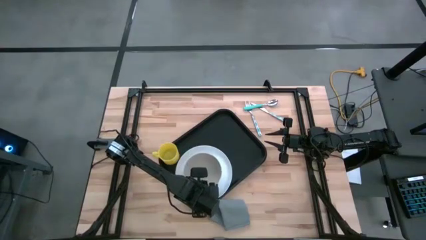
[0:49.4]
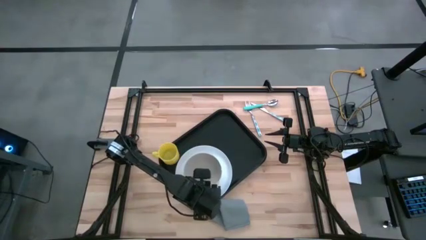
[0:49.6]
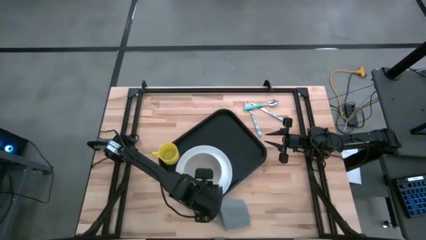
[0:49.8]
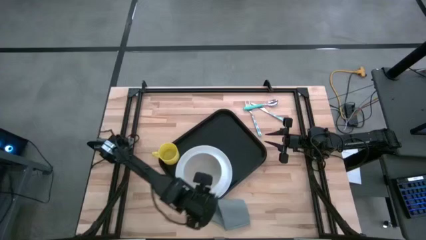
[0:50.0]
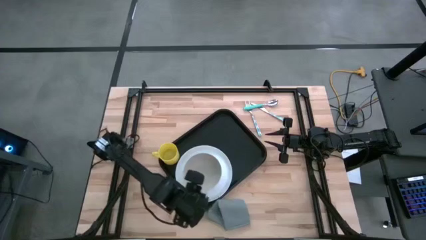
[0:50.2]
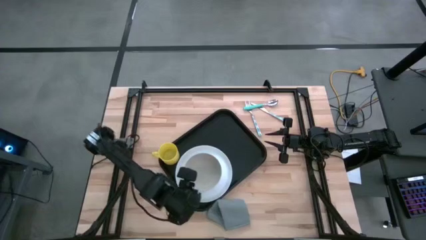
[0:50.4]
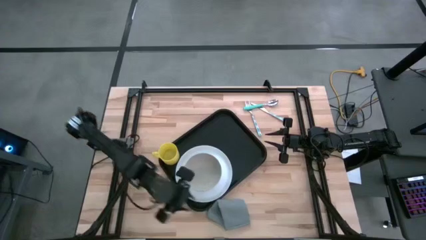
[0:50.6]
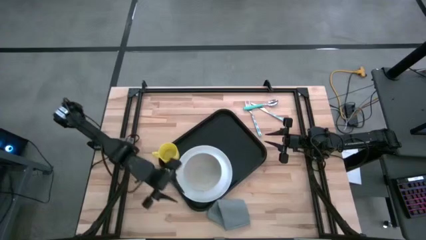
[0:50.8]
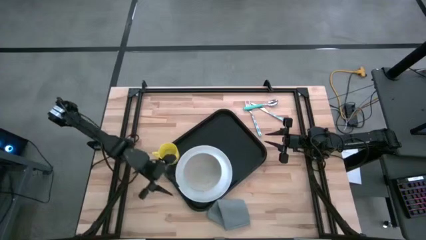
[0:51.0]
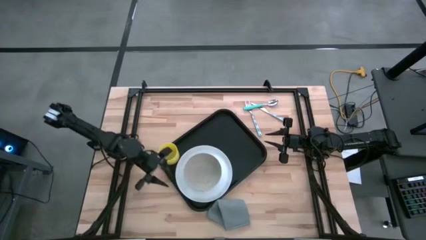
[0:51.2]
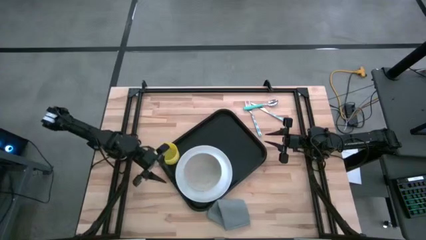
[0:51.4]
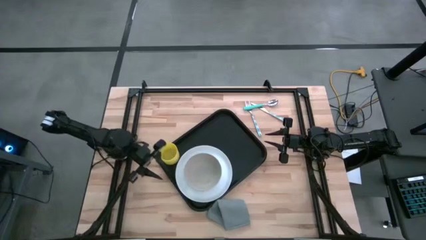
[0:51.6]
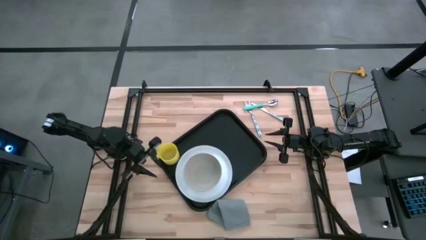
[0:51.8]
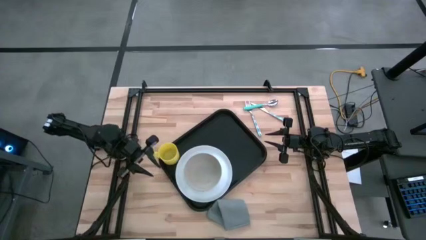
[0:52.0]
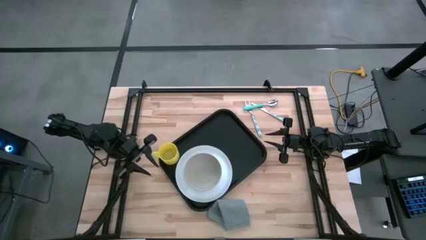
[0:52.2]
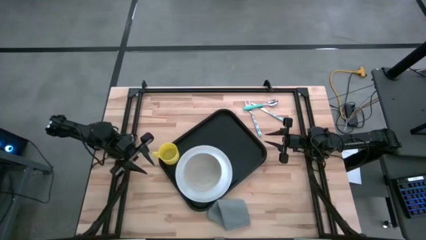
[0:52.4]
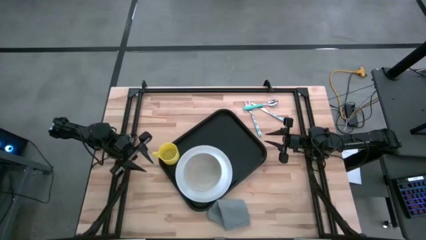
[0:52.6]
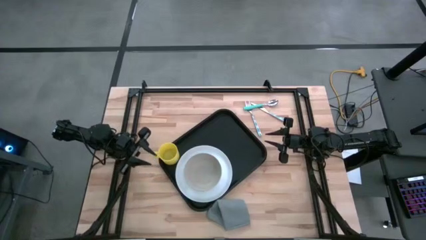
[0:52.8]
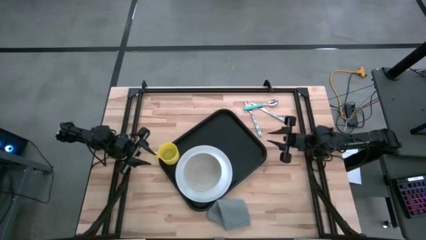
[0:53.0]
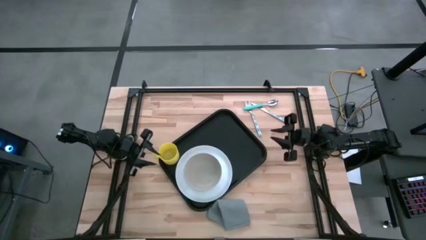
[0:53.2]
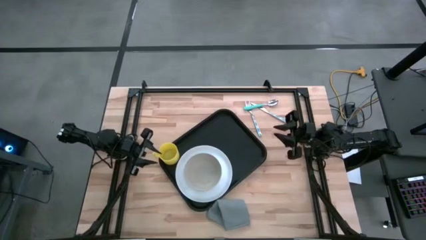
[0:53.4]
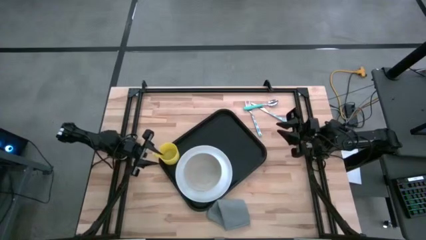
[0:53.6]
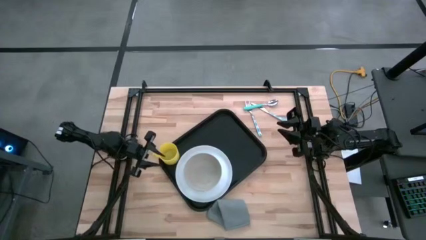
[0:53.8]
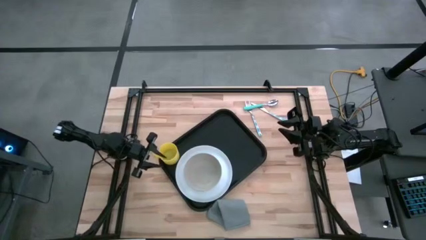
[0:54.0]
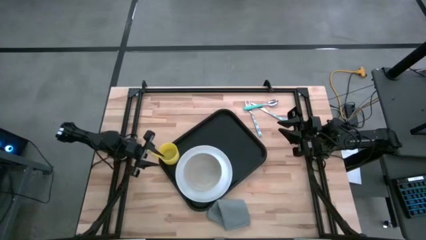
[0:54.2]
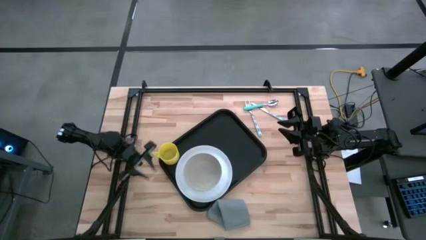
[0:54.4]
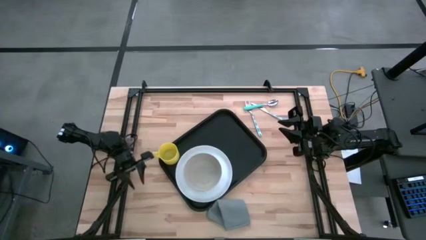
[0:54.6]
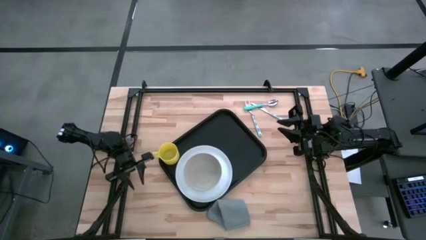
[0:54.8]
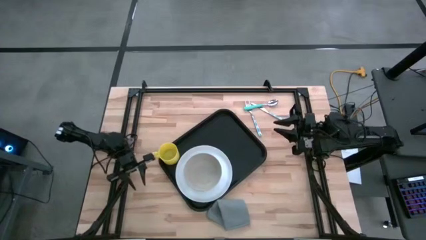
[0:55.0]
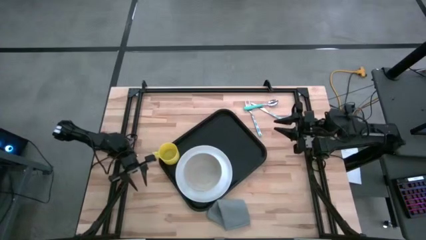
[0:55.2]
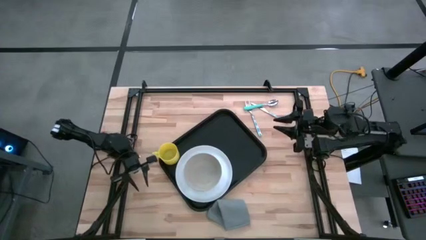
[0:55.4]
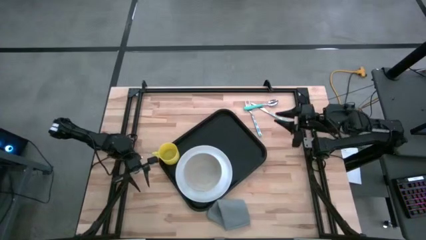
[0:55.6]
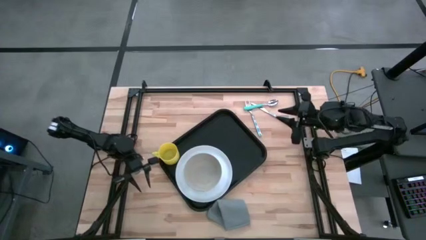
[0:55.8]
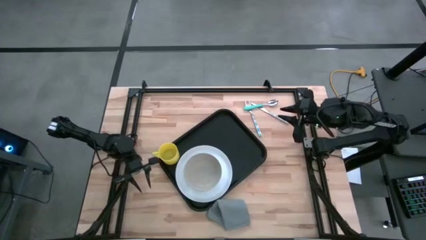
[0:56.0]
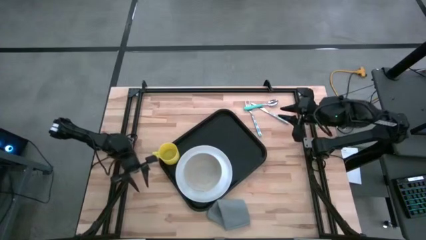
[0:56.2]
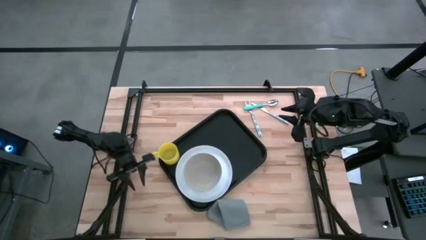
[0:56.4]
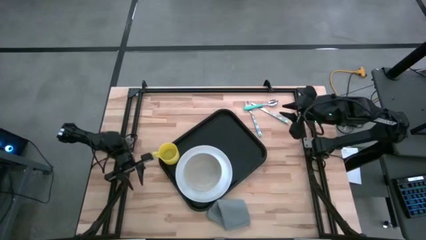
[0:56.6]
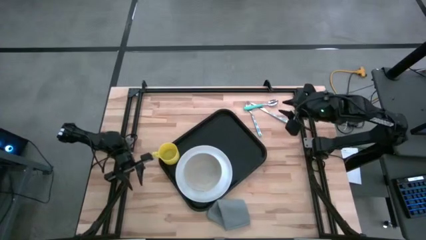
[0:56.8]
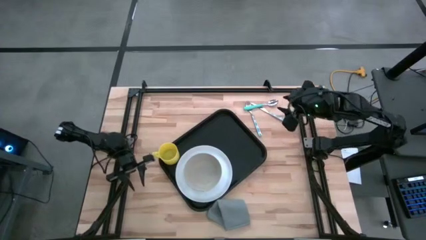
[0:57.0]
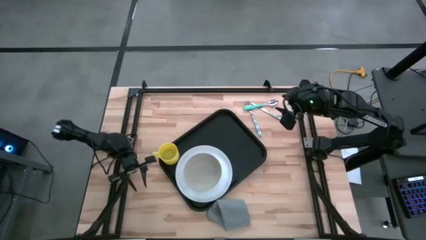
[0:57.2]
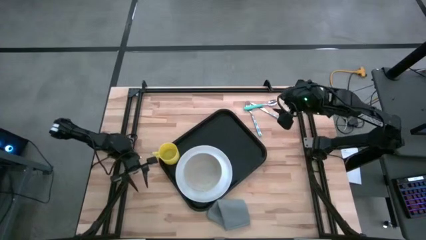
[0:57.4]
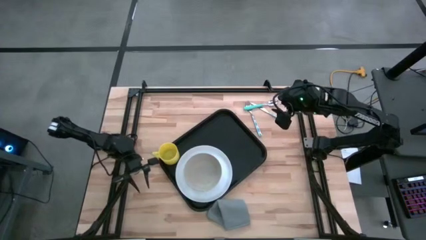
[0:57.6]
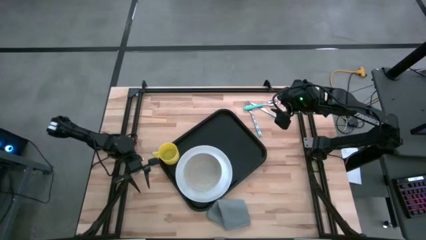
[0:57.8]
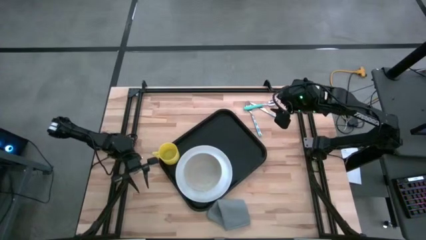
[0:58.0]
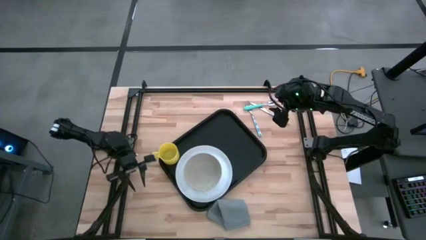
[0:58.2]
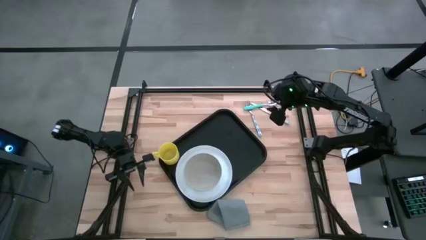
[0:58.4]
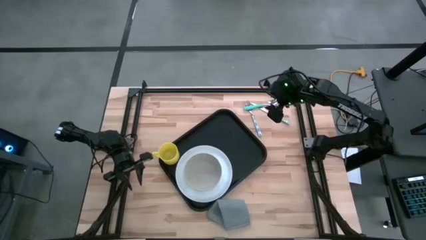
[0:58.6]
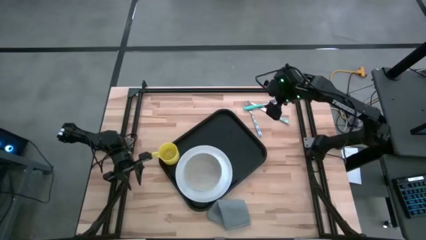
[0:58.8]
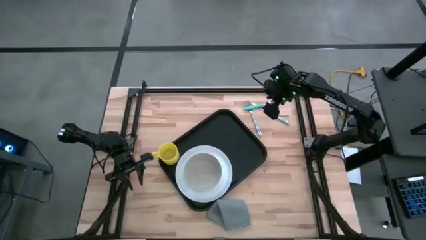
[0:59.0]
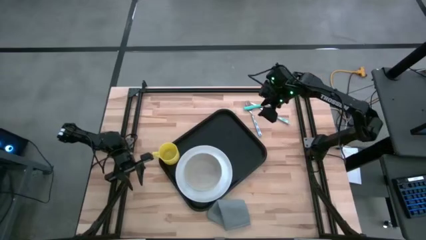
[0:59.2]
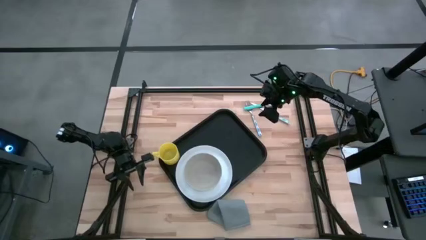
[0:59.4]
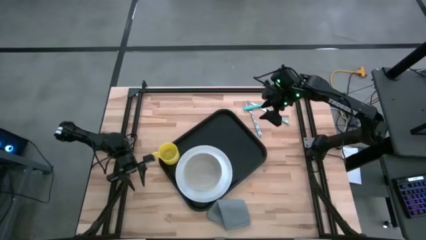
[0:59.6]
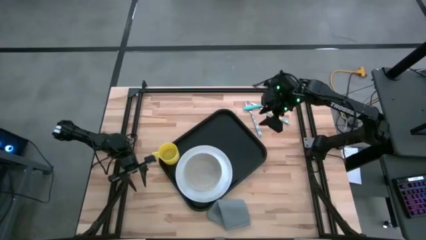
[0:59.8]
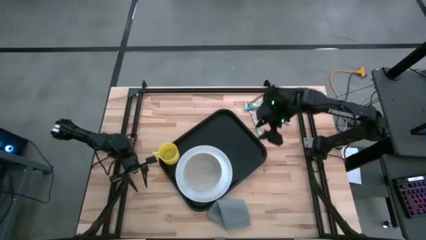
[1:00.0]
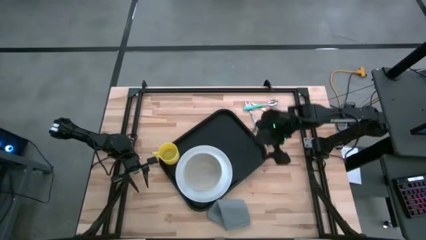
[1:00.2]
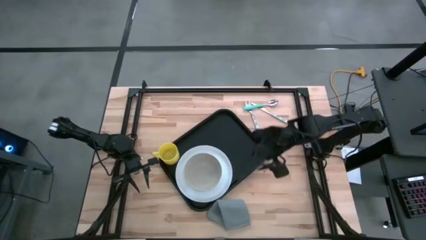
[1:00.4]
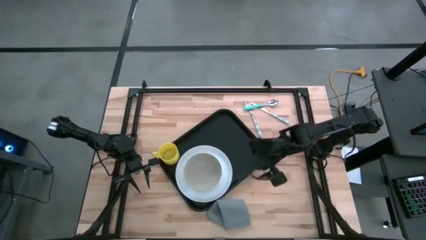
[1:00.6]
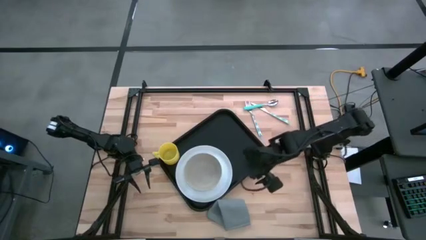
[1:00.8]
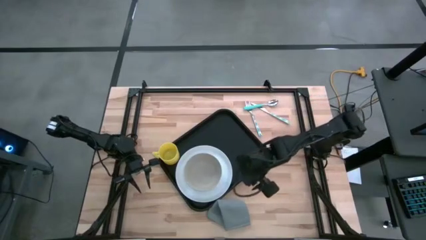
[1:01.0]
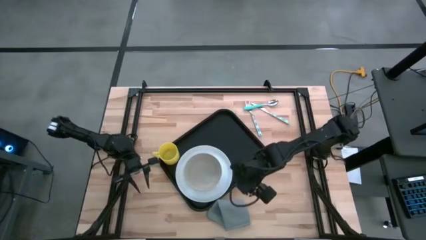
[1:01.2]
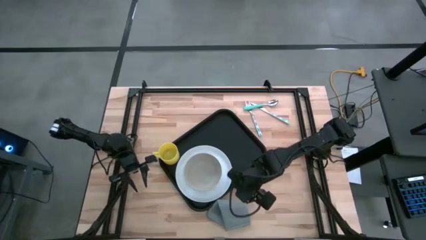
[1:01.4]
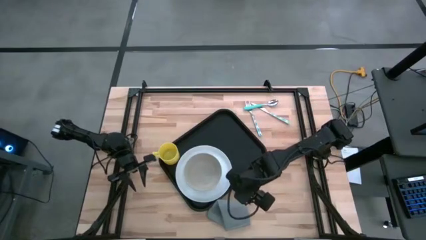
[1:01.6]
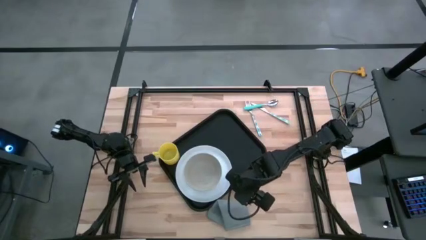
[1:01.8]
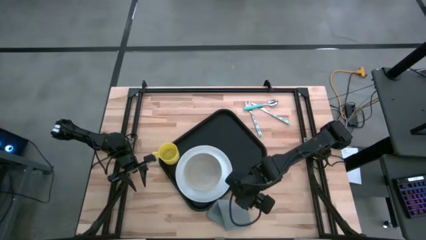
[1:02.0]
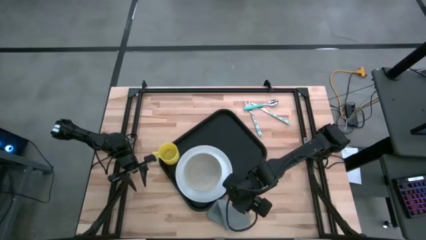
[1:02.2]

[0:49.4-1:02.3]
Task: Set up tray
Put the gray napkin on the black tray to the right of the white plate
